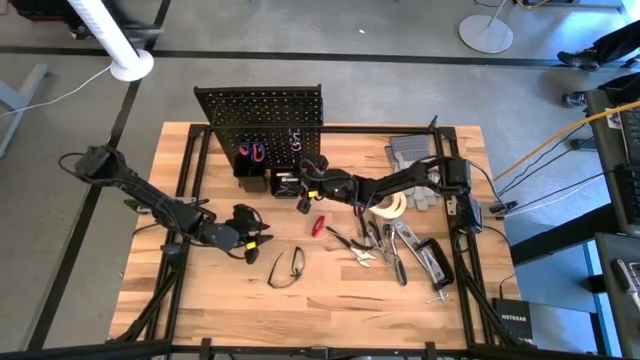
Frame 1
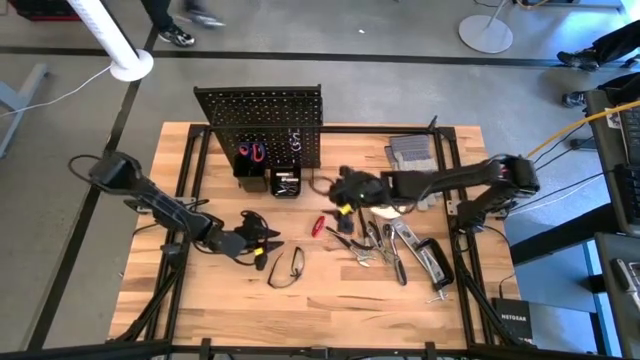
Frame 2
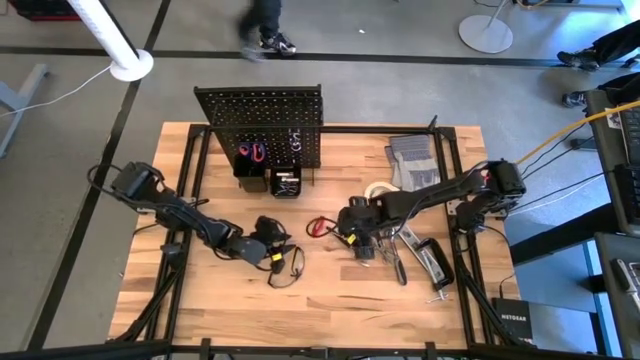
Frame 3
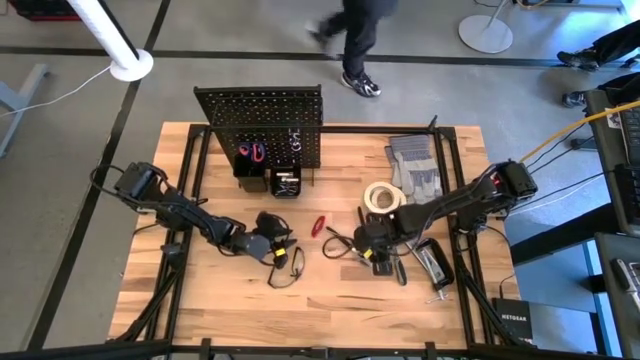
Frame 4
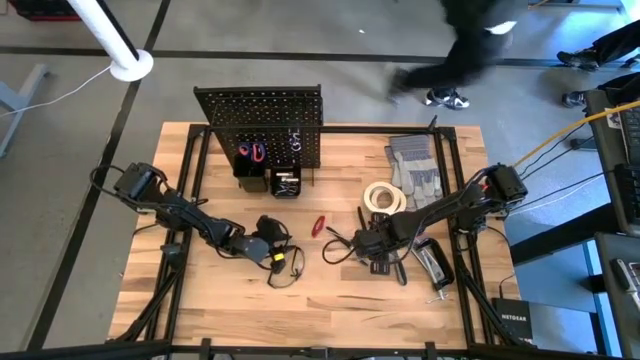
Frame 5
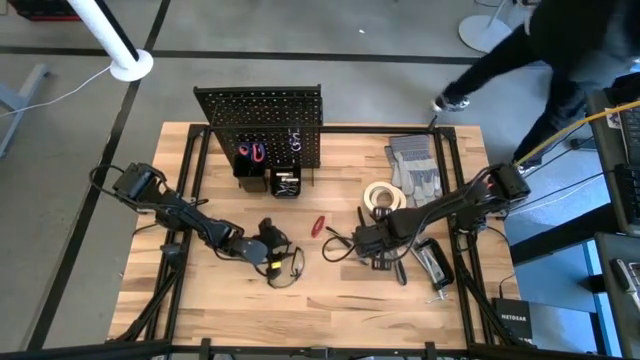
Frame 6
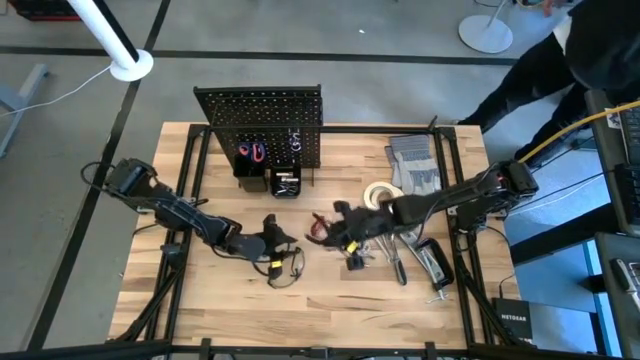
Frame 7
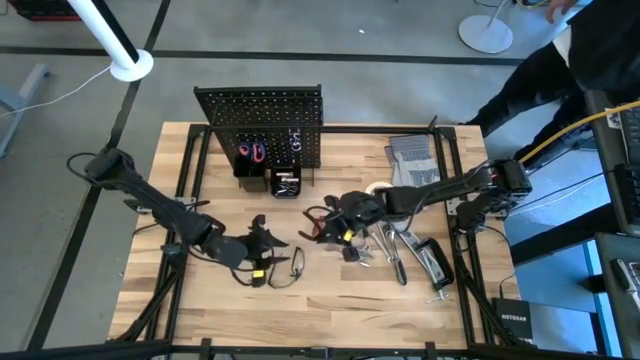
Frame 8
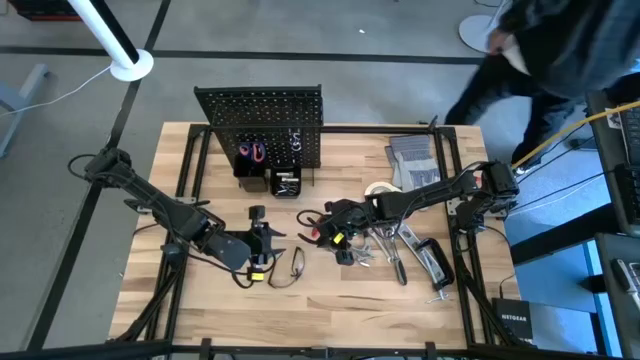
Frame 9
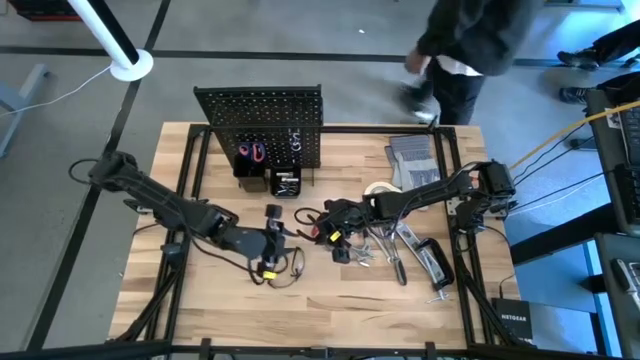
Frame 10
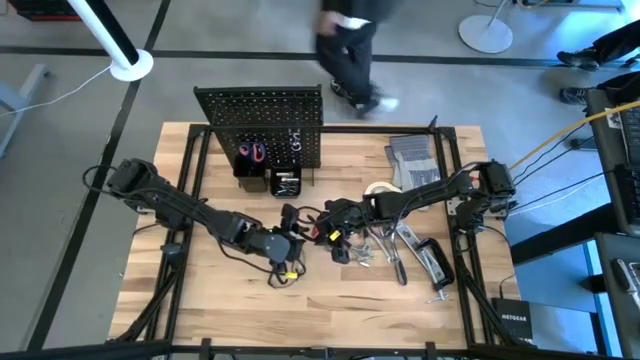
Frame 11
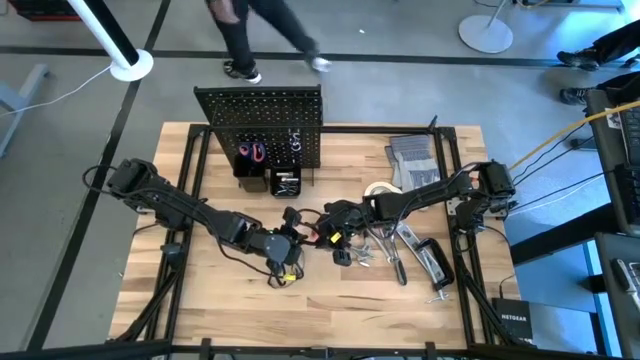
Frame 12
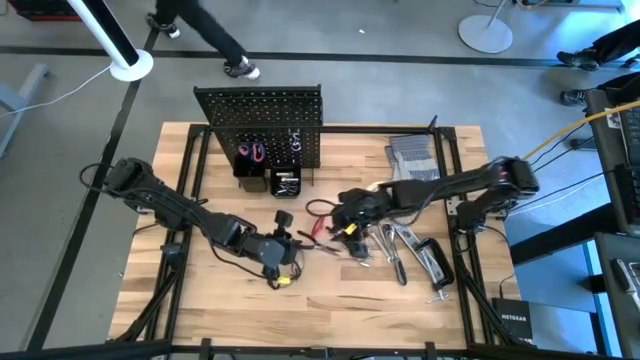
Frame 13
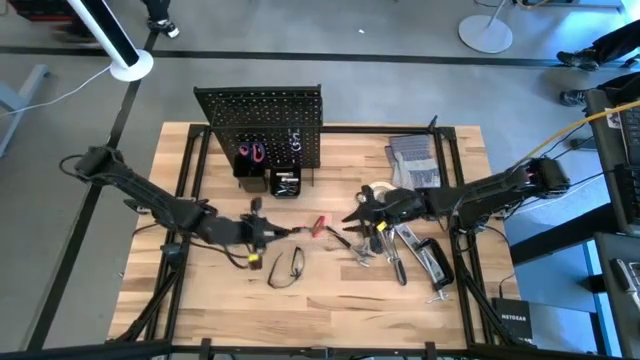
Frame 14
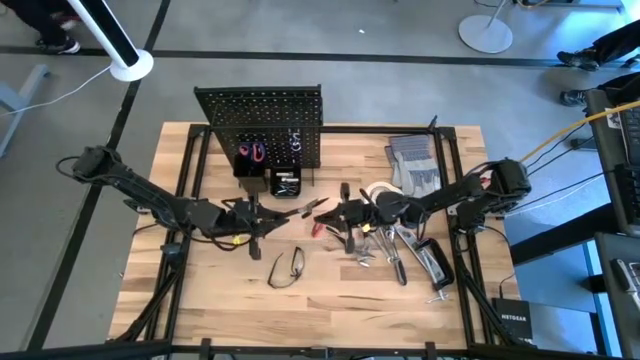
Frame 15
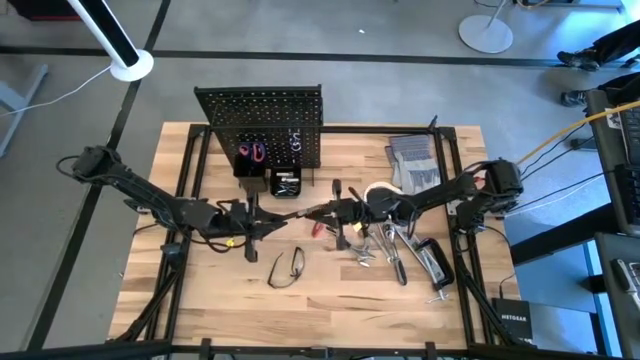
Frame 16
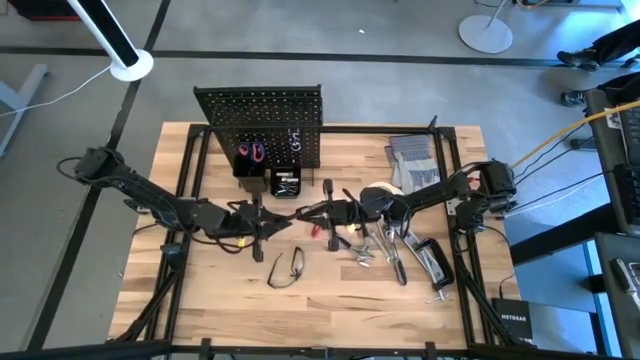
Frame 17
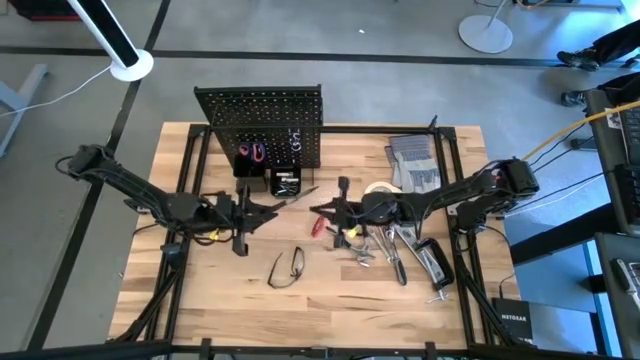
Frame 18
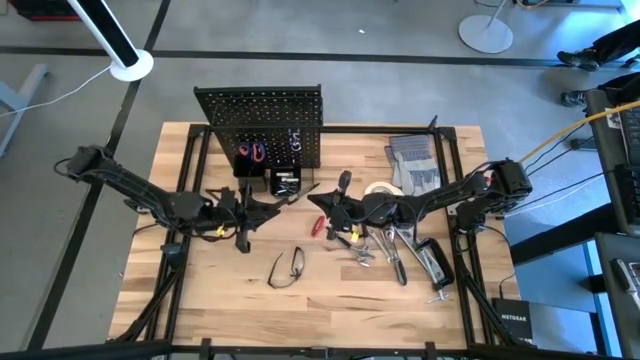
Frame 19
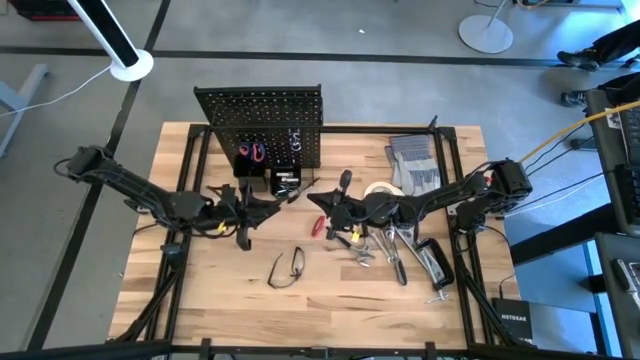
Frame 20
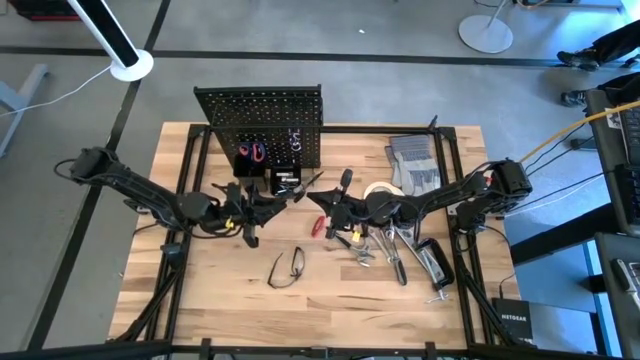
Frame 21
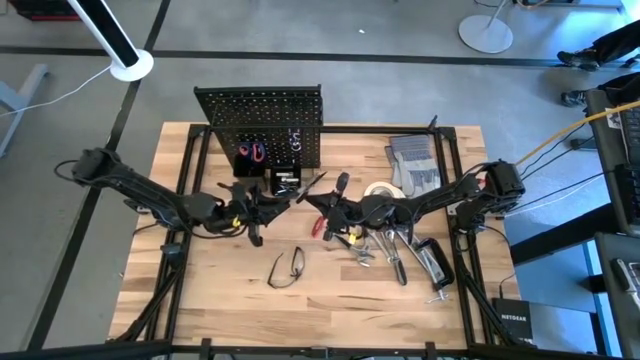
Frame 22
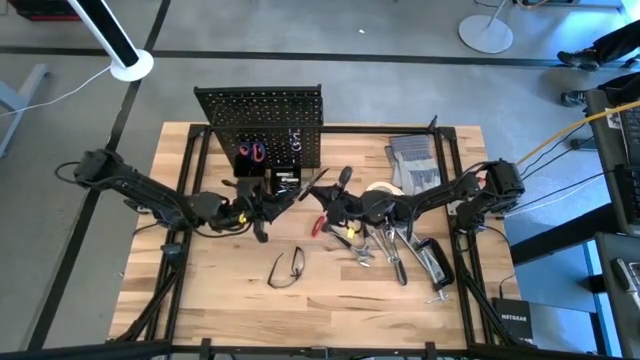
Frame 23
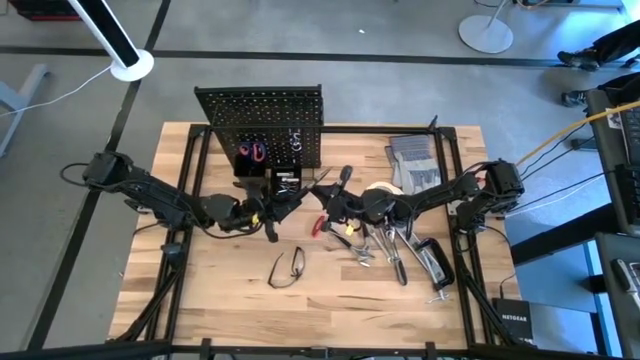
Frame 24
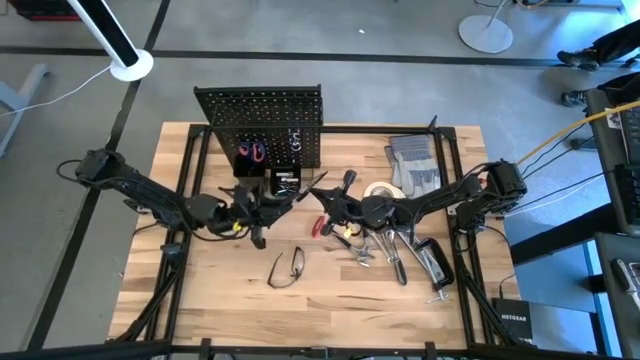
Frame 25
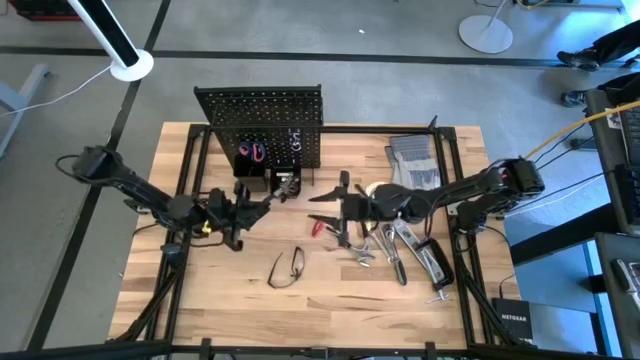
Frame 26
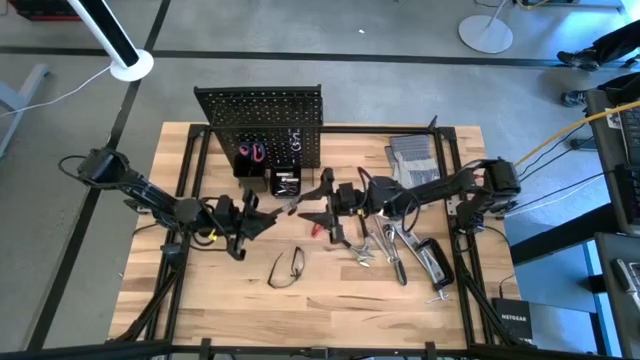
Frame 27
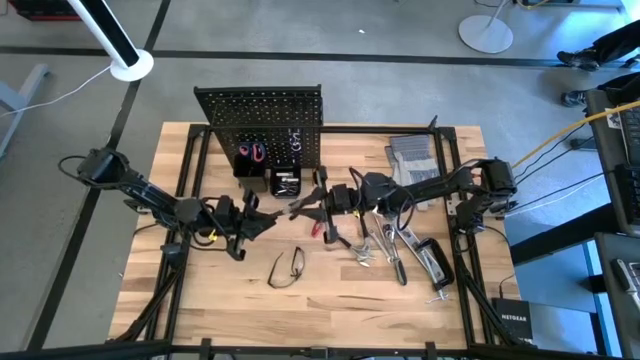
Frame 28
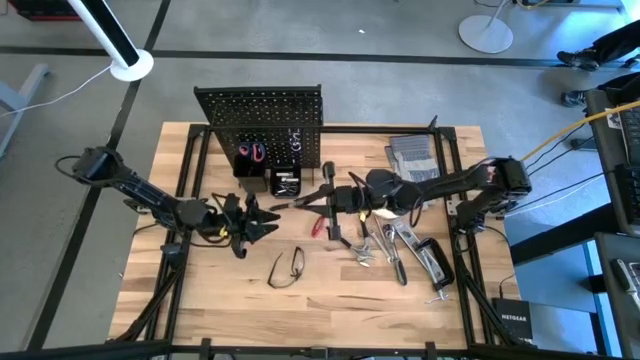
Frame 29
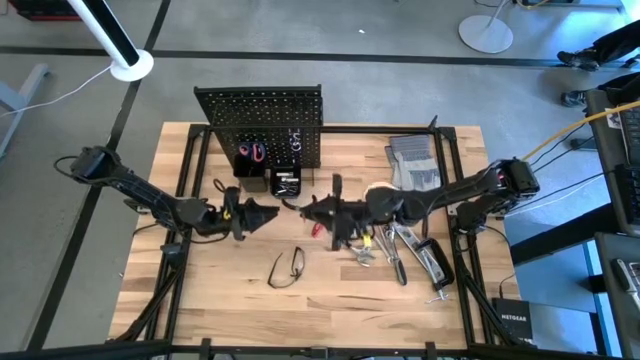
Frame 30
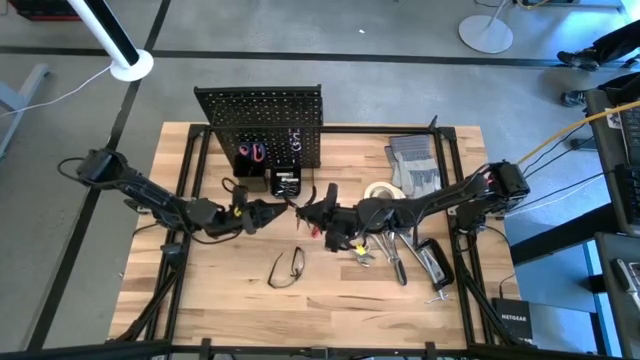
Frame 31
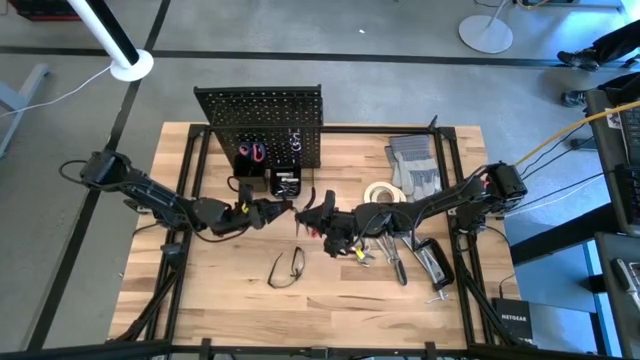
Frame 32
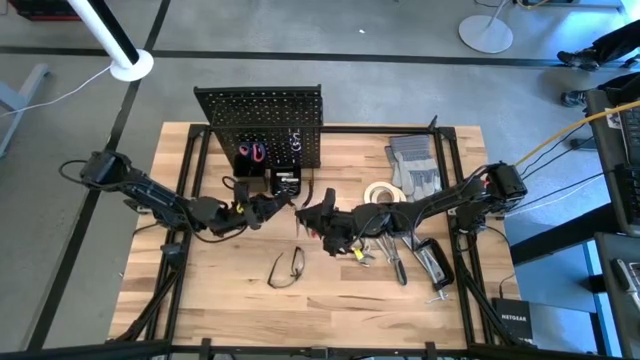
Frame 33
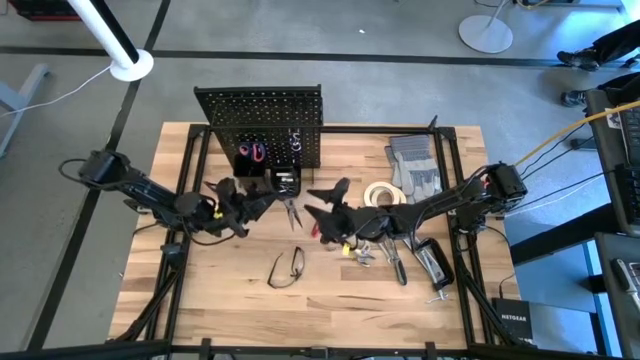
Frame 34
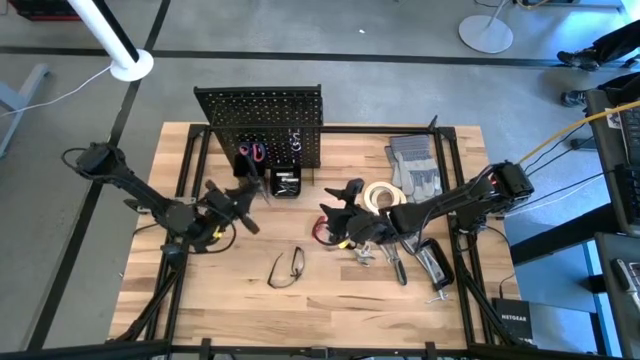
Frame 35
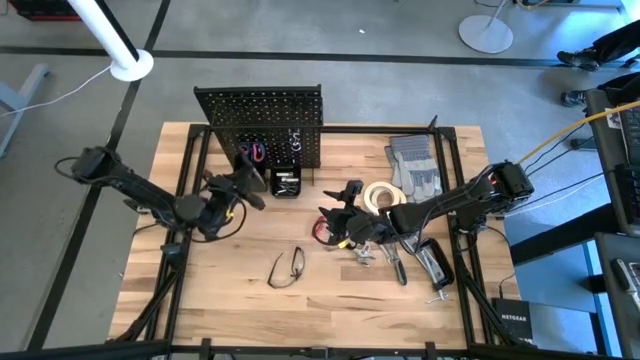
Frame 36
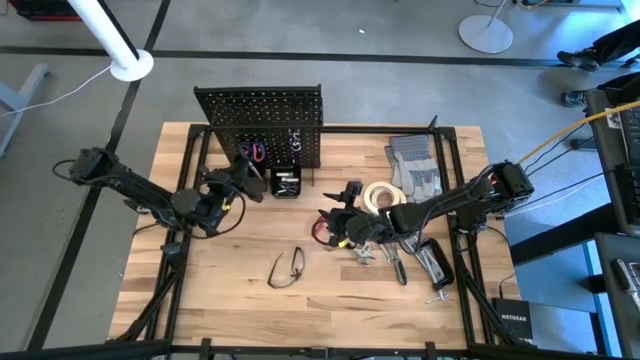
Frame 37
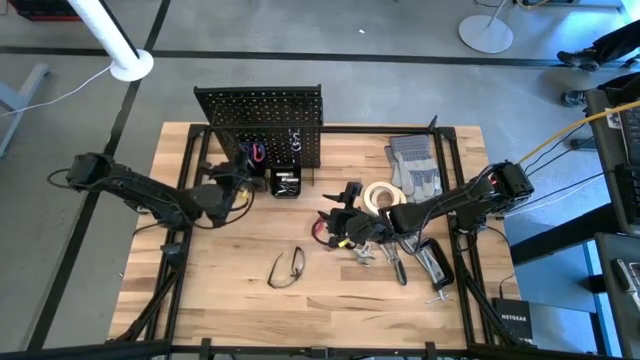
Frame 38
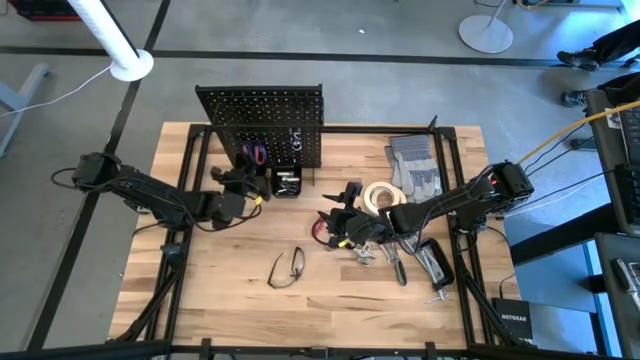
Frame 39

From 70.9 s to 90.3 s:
Task: Hang tools onto peg board
Put the pliers into the left pegboard organizer bin

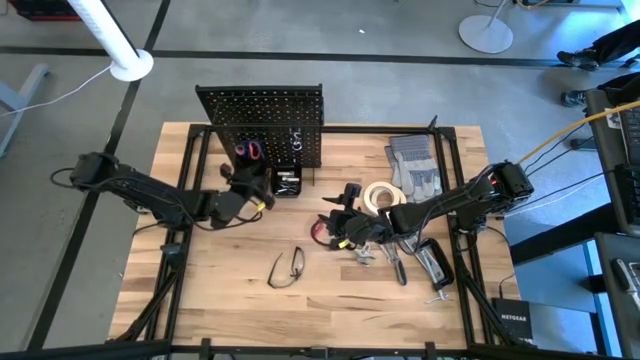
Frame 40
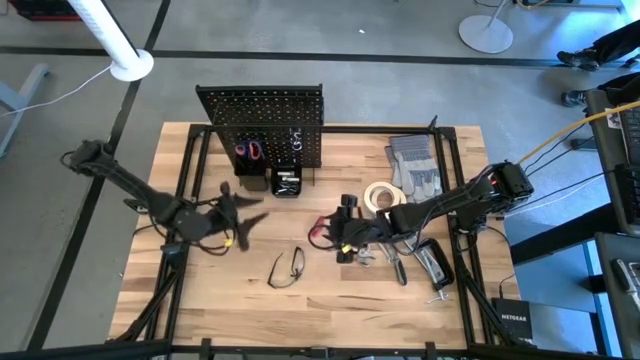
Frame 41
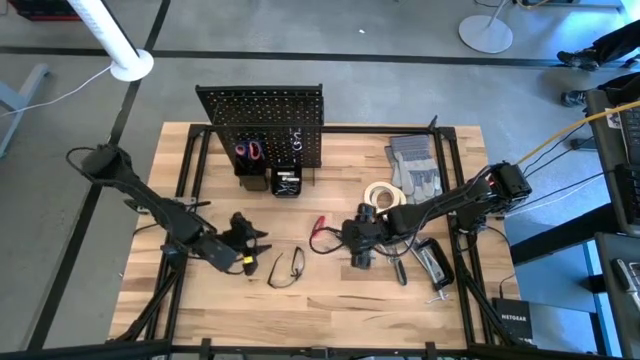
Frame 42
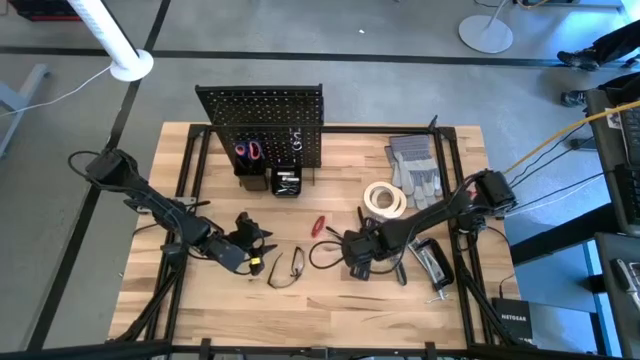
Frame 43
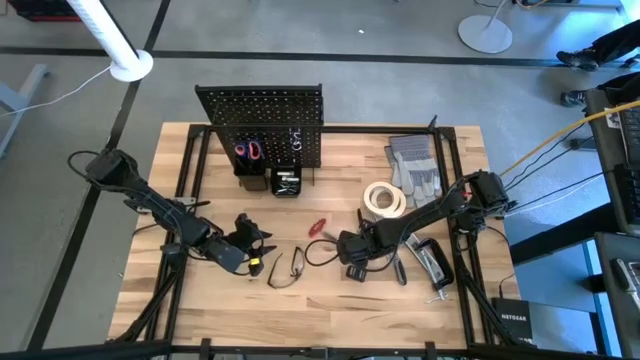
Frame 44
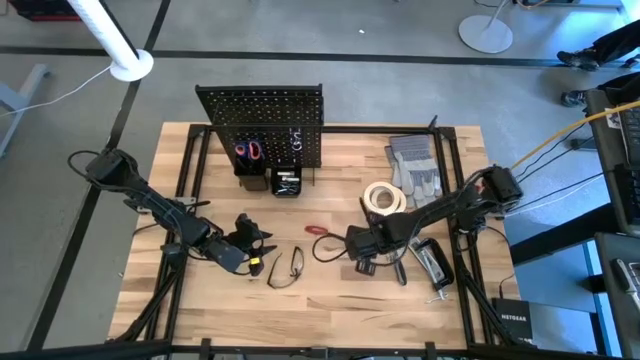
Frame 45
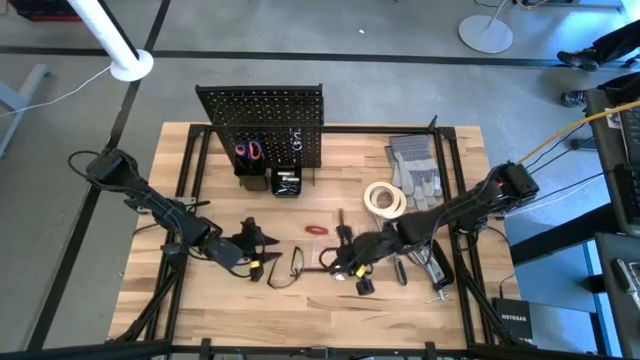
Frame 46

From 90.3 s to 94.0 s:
Put the pliers into the left pegboard organizer bin
